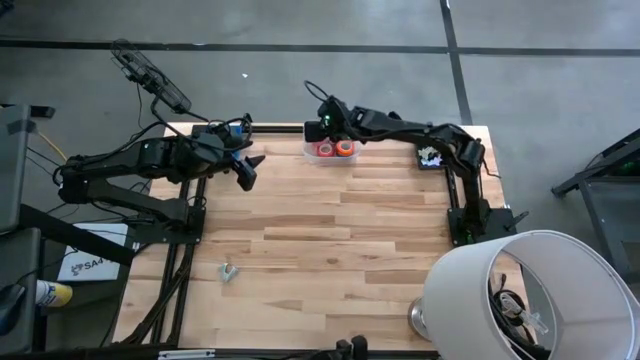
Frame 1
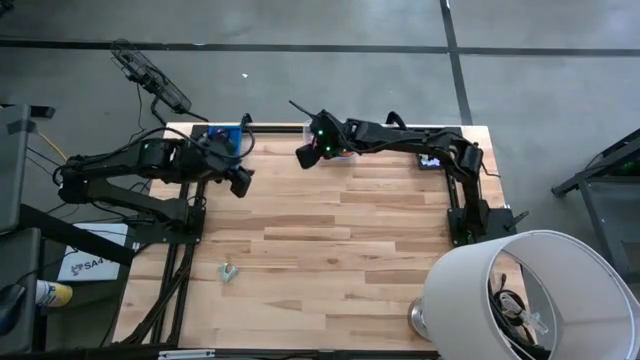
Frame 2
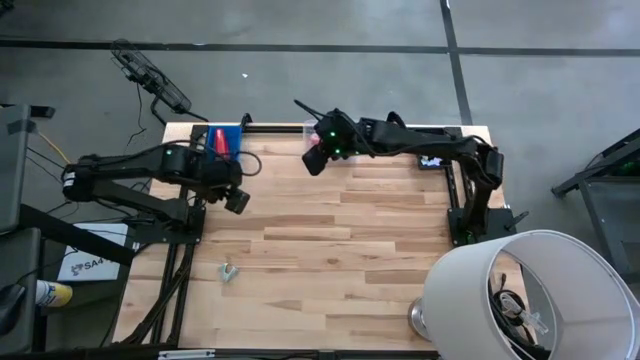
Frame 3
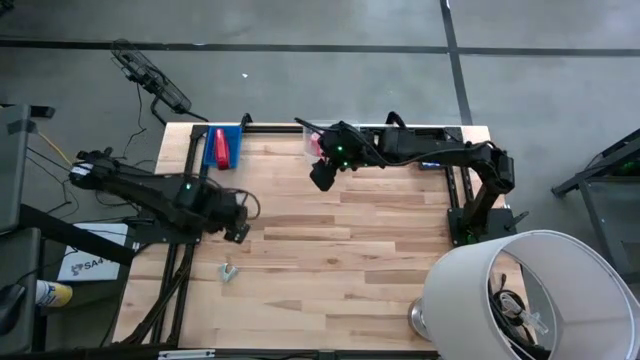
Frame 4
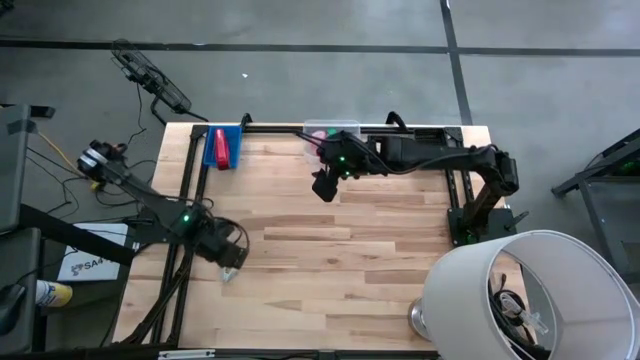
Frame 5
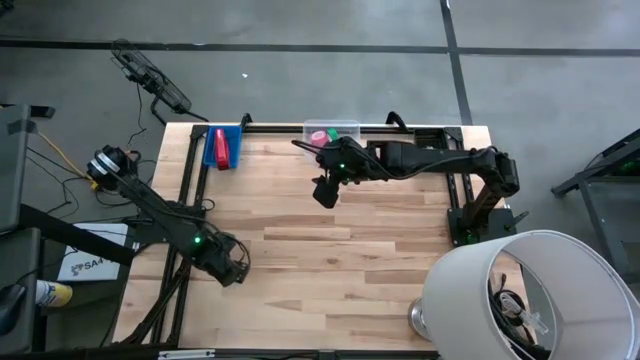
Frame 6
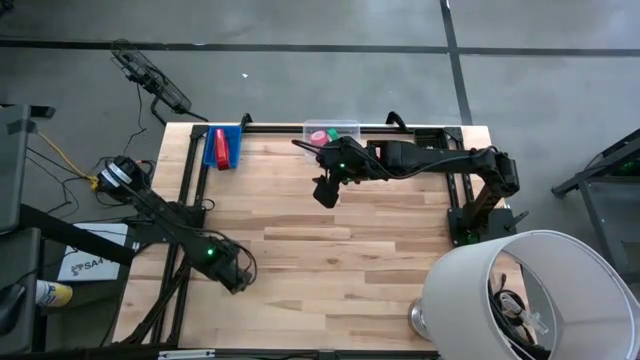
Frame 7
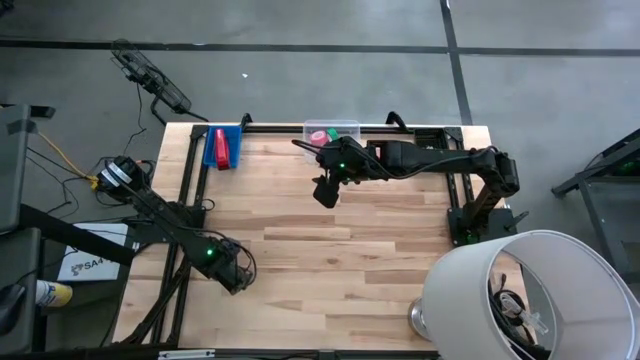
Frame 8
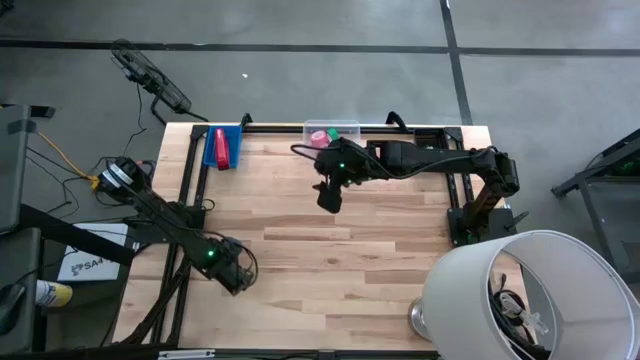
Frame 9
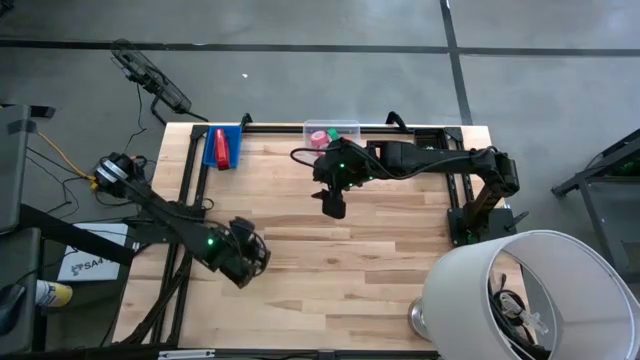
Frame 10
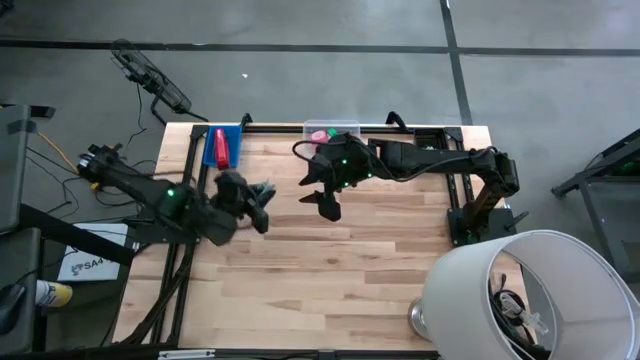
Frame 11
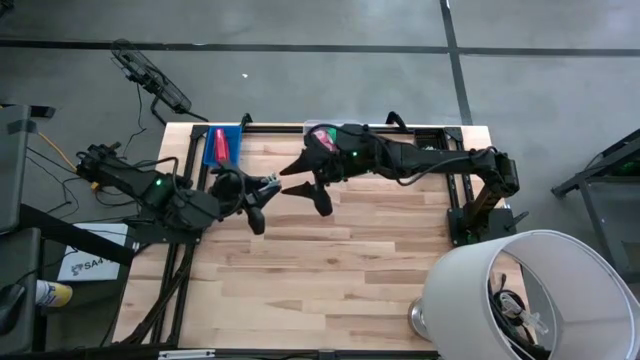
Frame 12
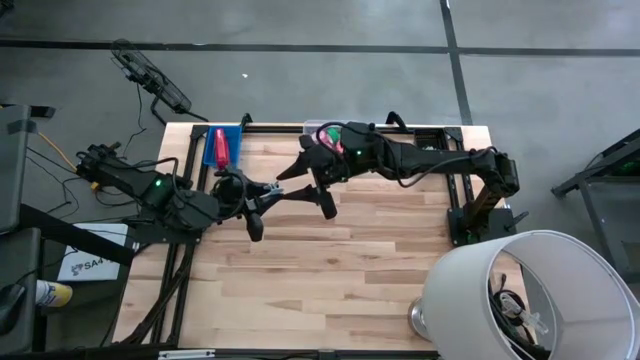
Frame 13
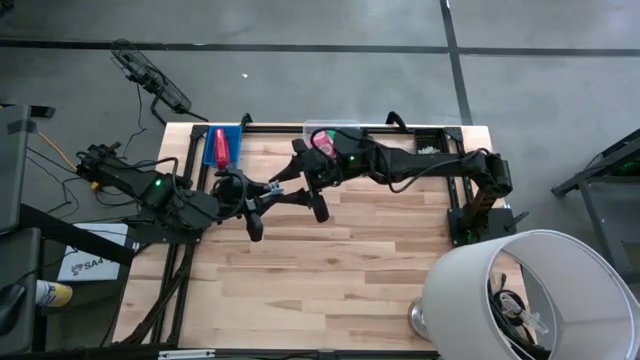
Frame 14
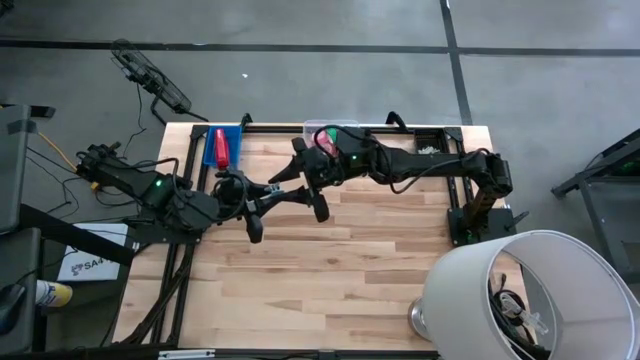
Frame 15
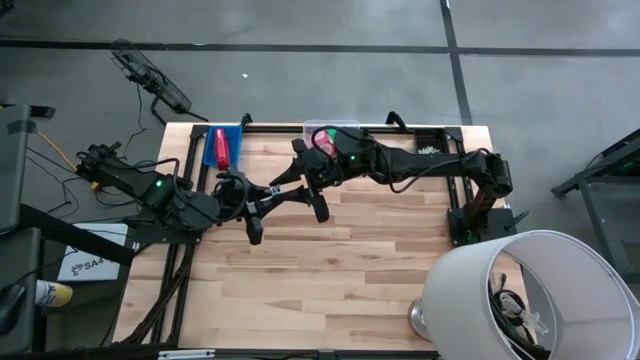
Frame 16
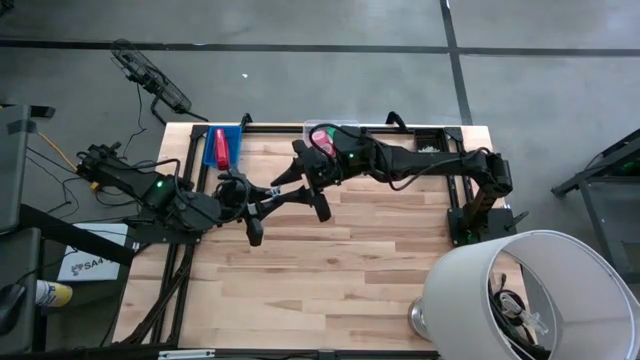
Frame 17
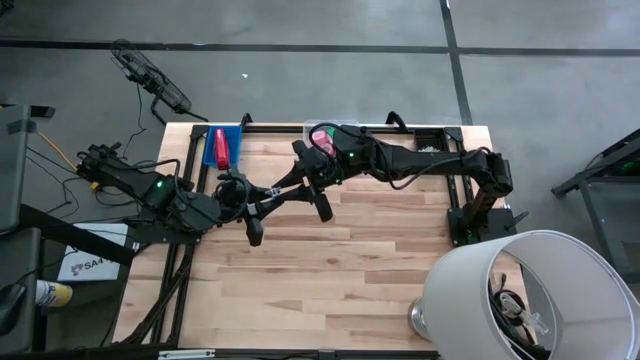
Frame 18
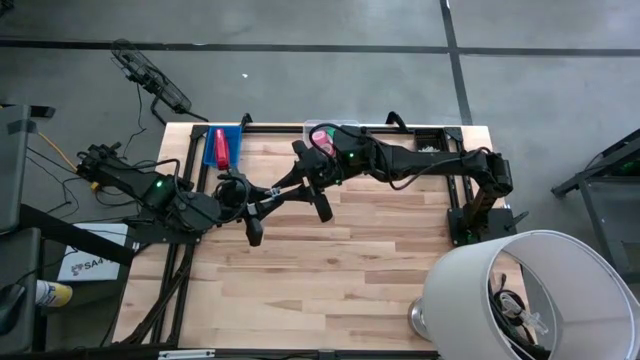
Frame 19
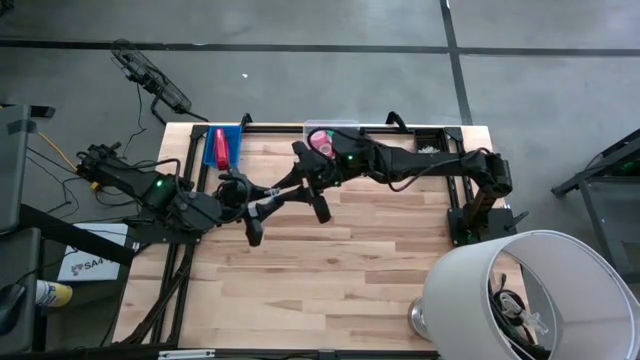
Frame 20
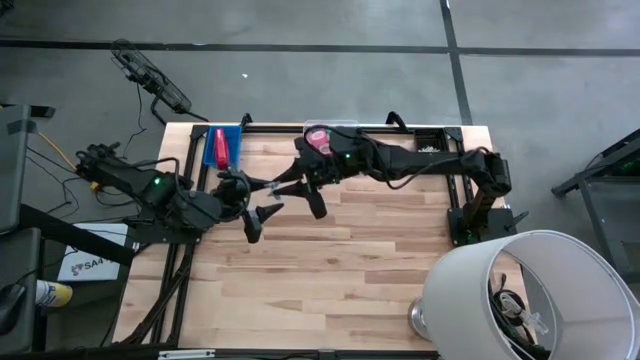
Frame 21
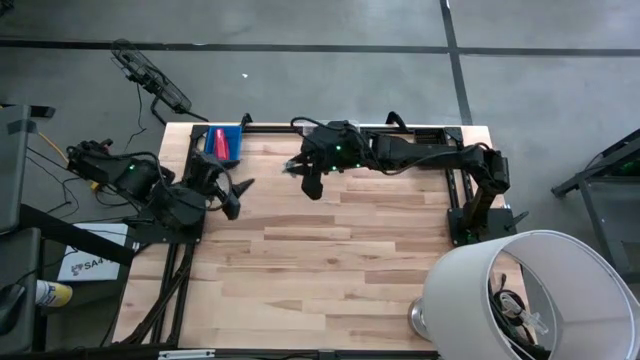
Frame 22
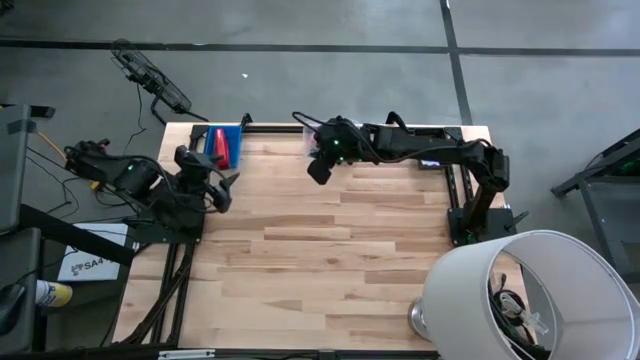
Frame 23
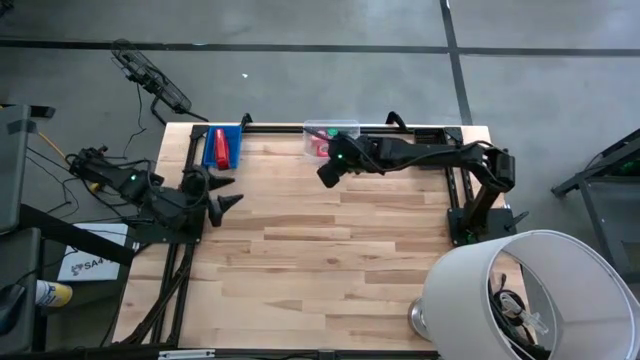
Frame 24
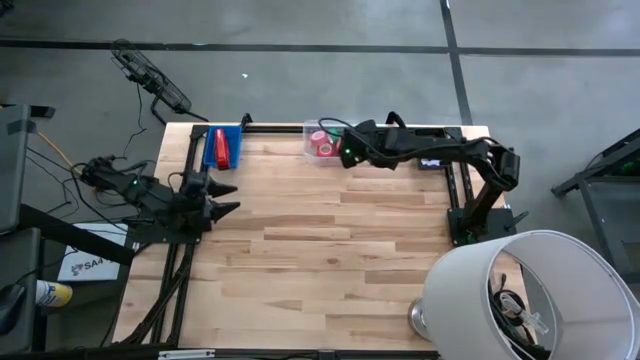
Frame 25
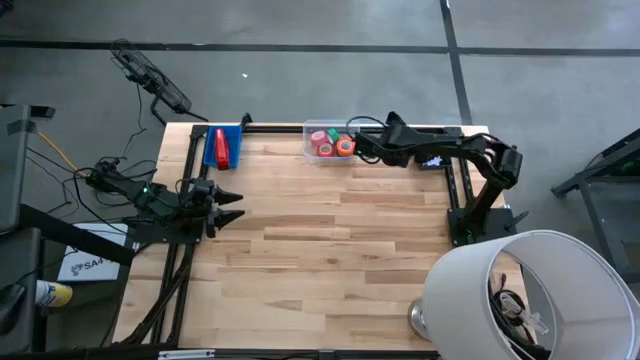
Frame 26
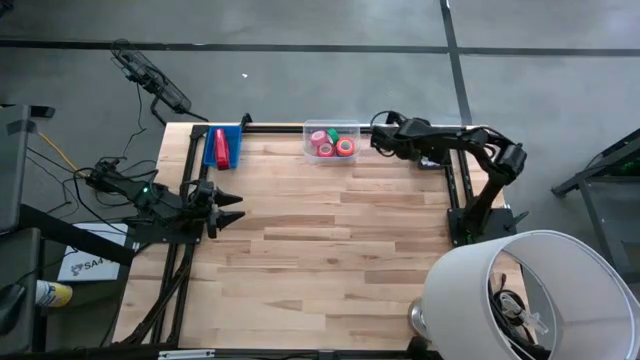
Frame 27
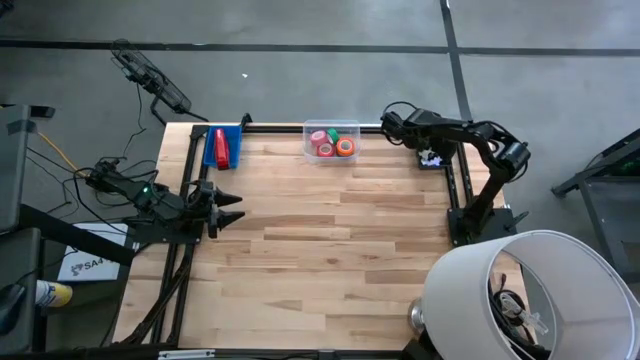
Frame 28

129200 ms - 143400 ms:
Task: Pick and place Stapler, Stapler remover, tape
Put the blue staple remover into the black bin

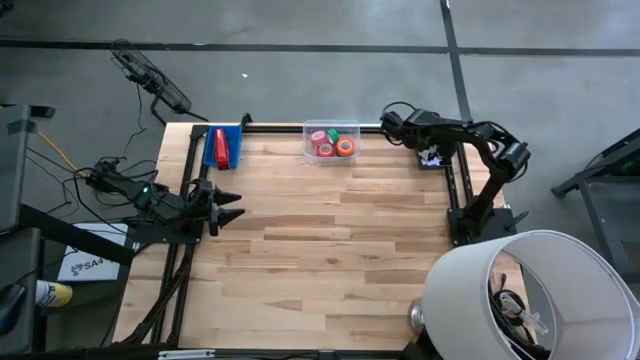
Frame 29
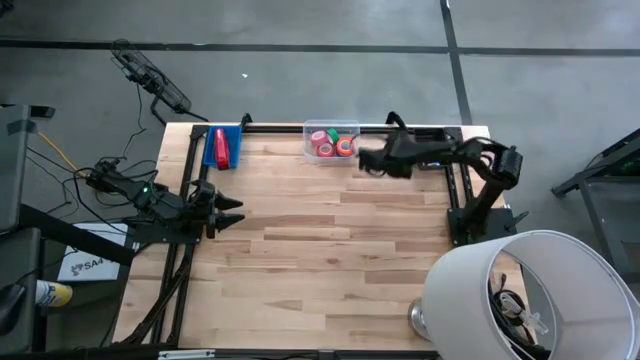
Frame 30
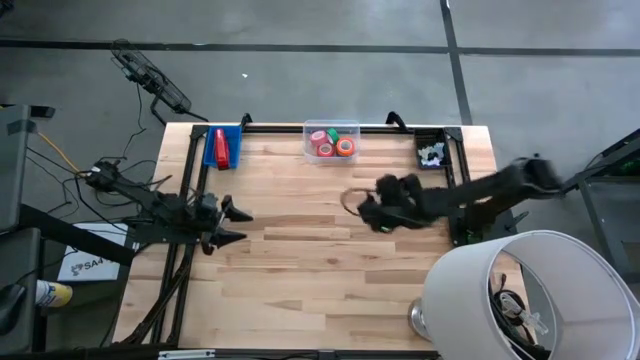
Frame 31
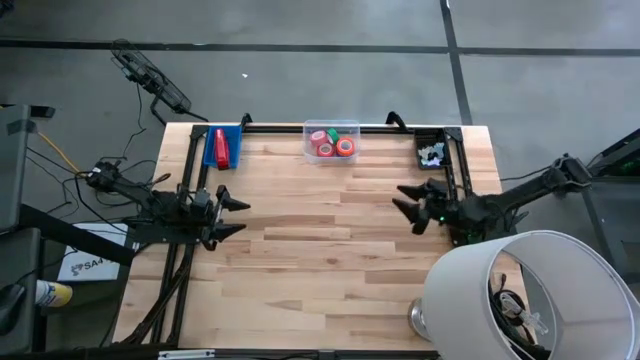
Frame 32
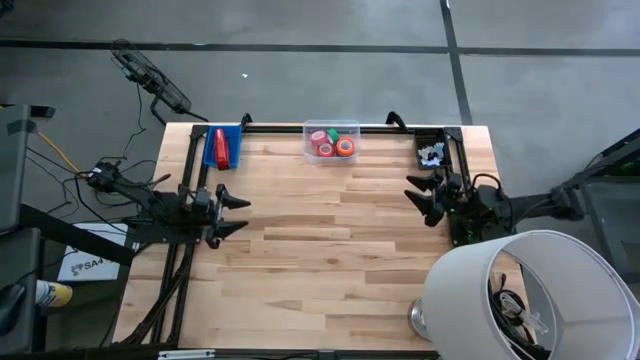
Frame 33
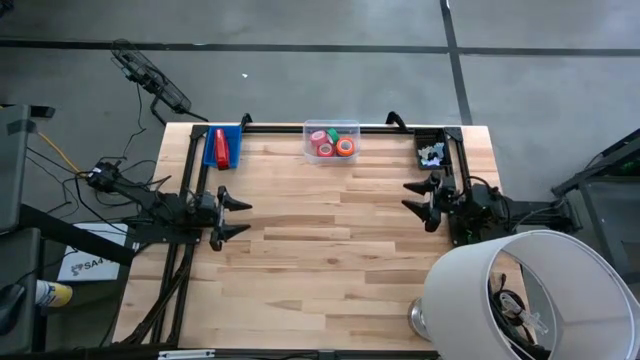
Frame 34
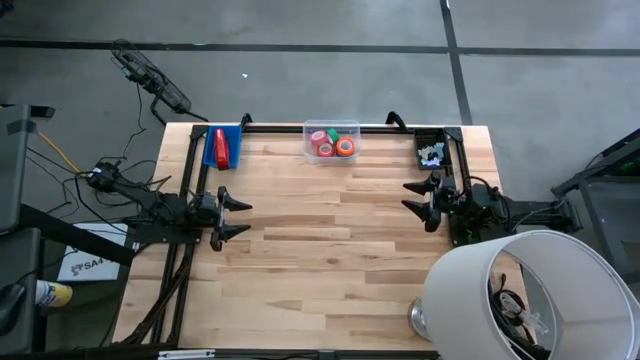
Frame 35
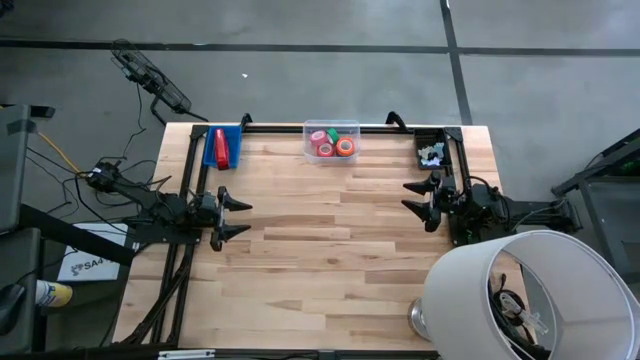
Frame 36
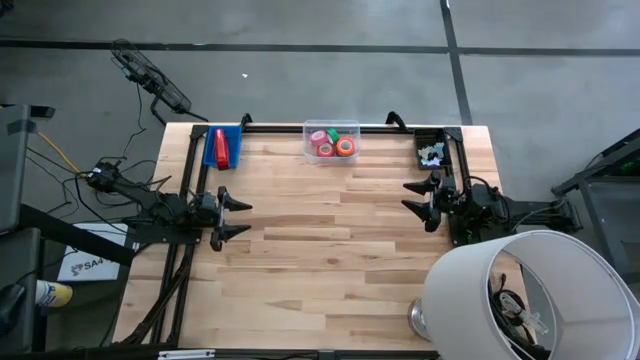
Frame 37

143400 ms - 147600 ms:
Return to Home Position

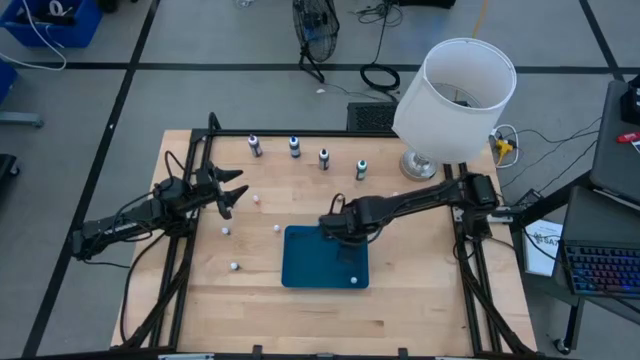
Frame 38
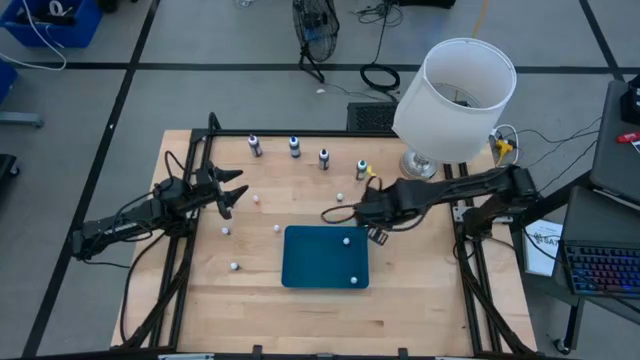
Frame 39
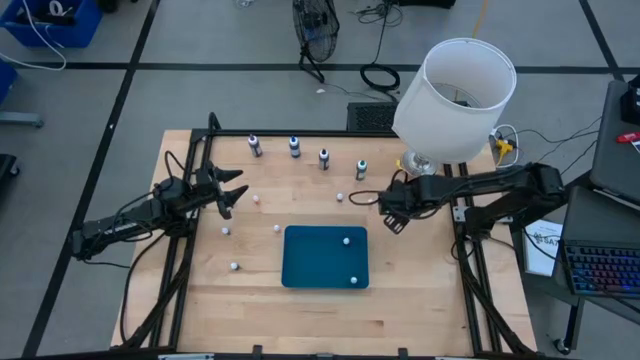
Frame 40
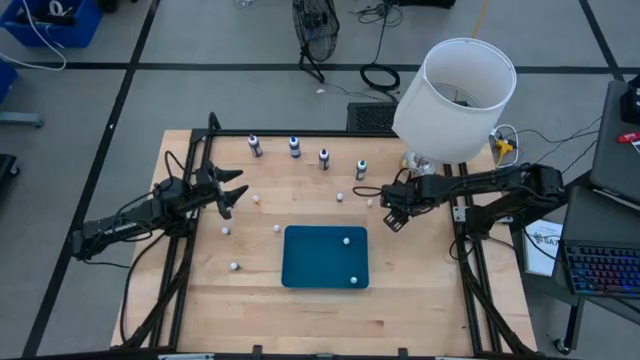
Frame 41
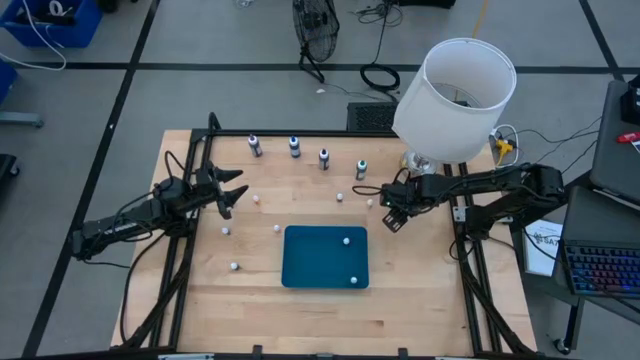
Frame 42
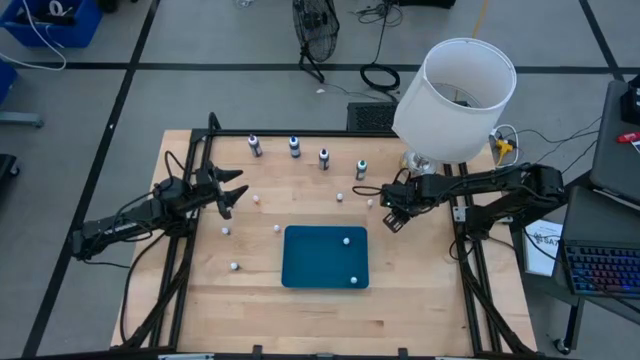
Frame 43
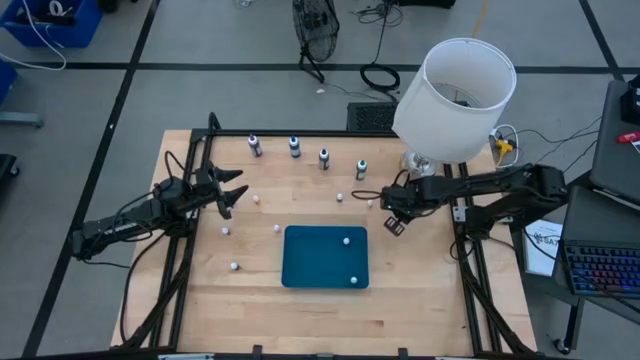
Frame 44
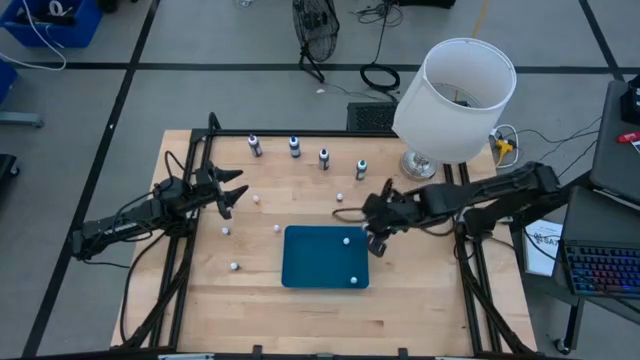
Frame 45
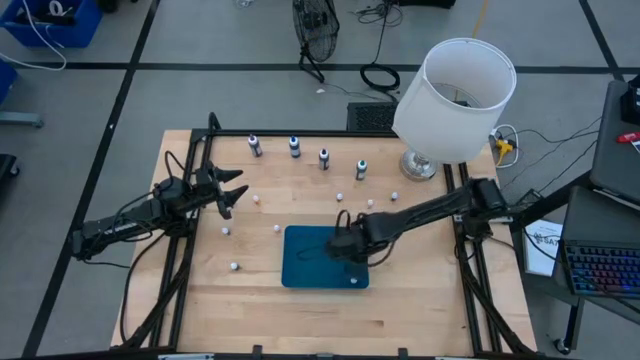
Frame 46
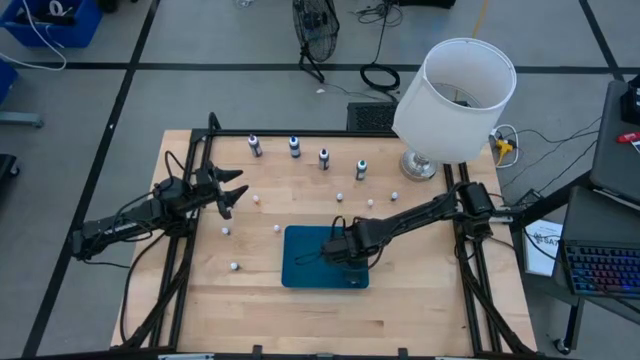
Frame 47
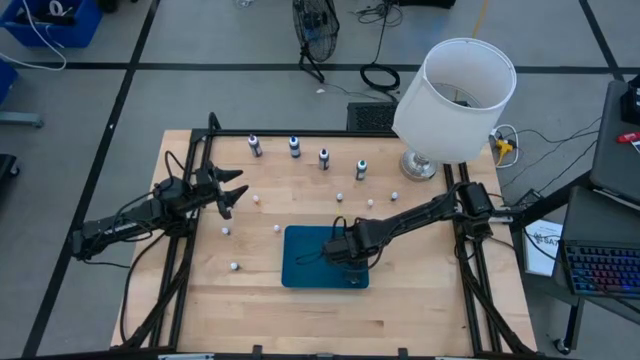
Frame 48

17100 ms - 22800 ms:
Task: Pick & Place food coloring
Put the right small purple food coloring bottle into the blue bin
